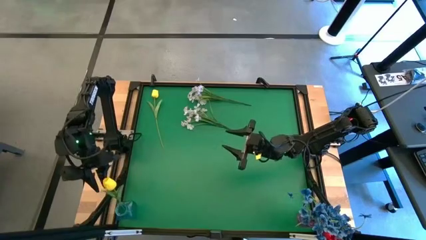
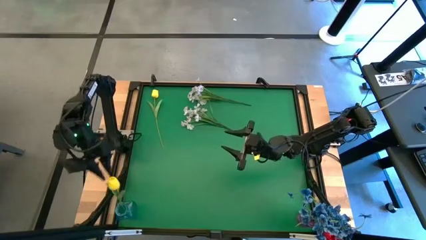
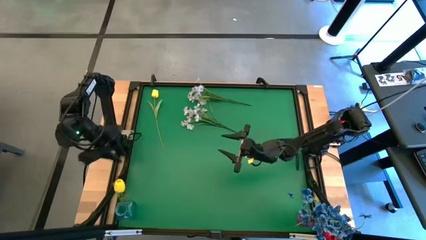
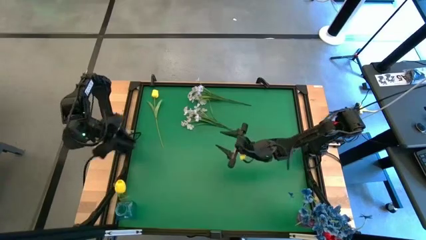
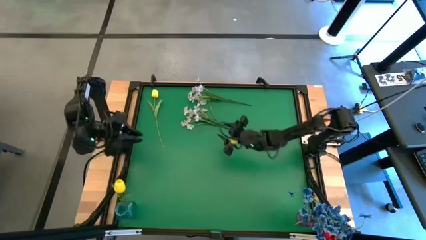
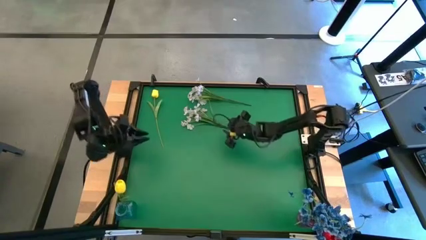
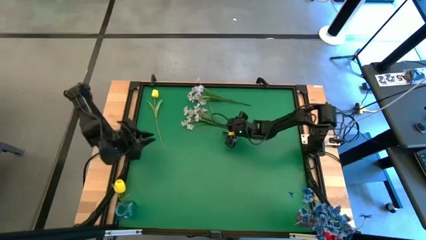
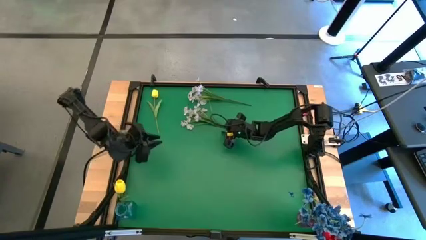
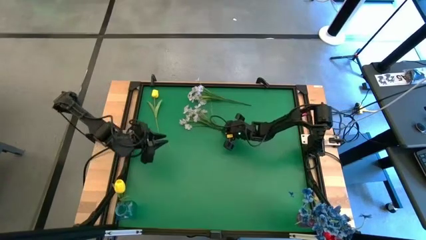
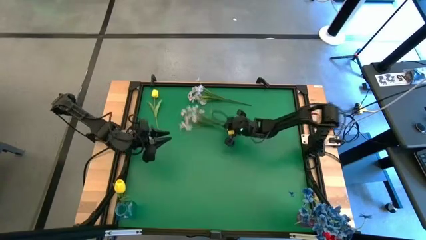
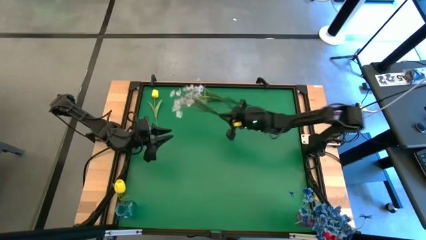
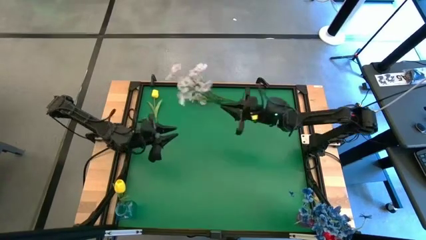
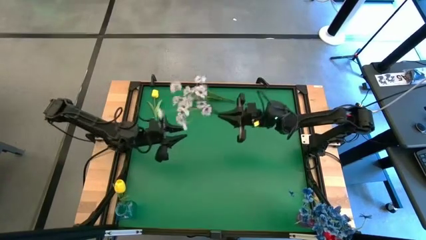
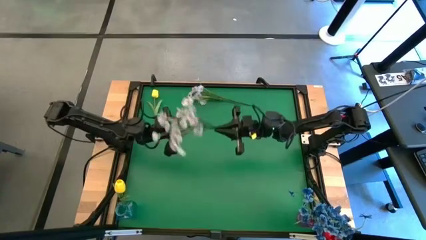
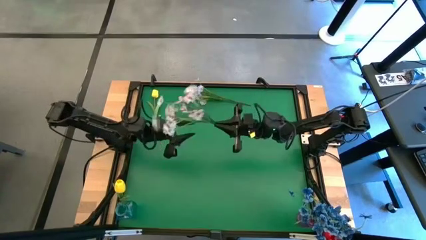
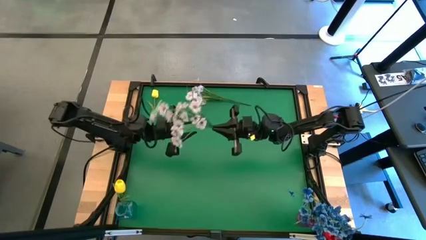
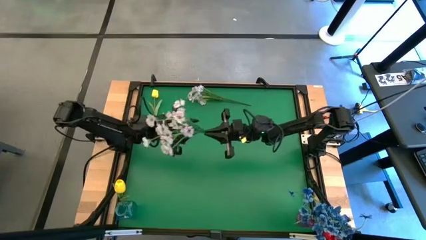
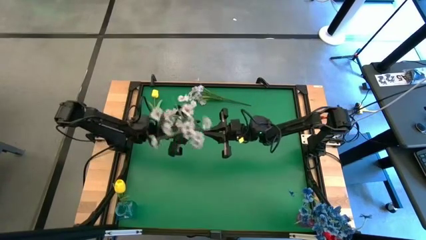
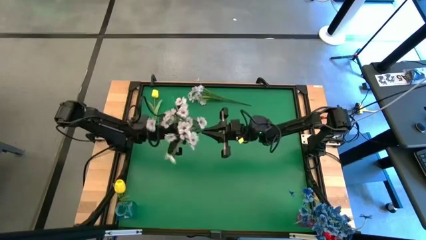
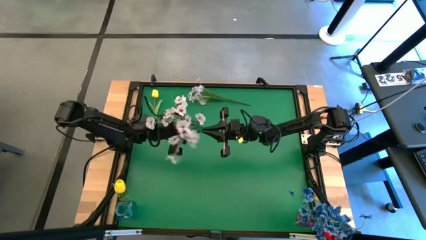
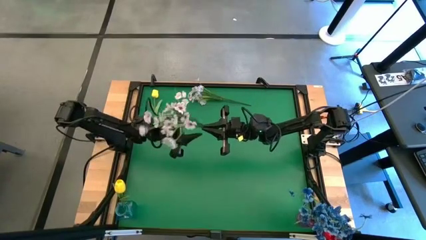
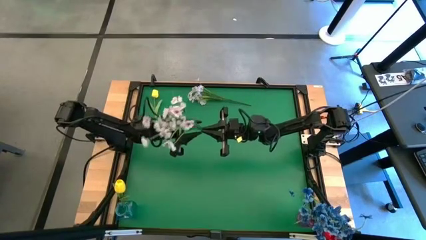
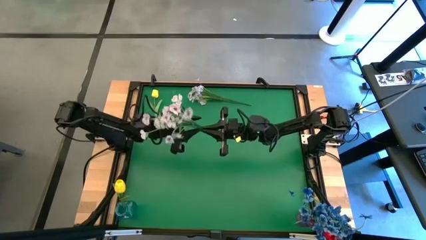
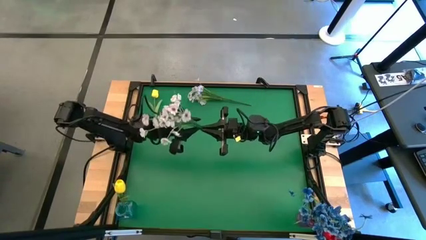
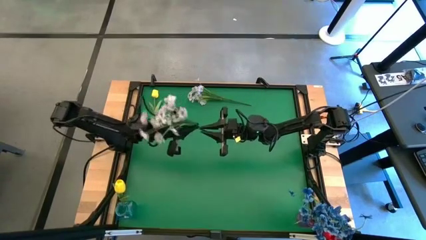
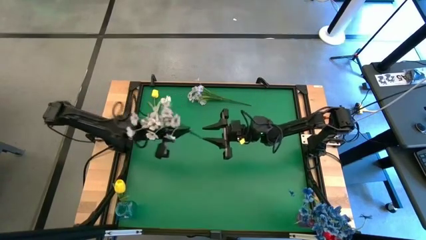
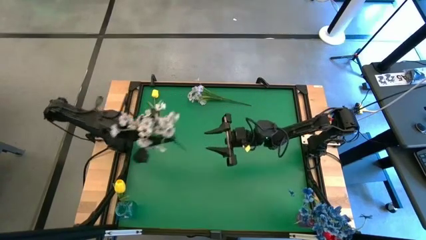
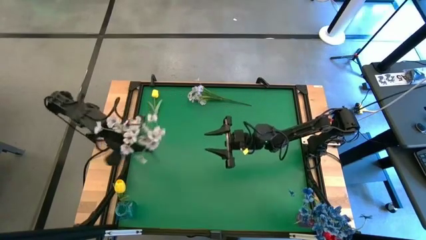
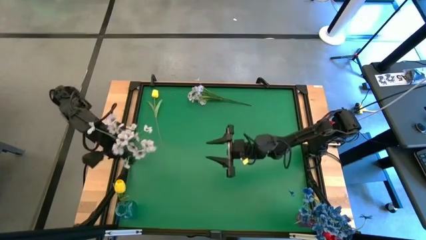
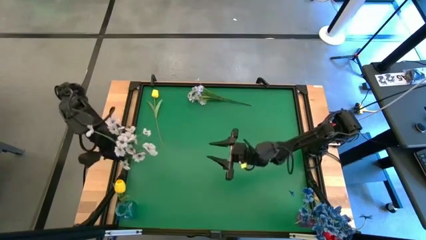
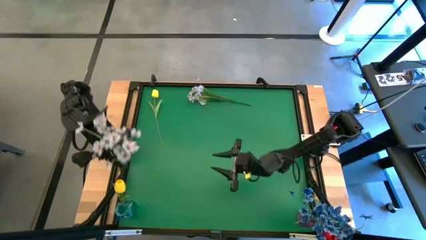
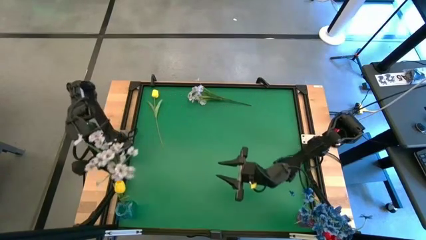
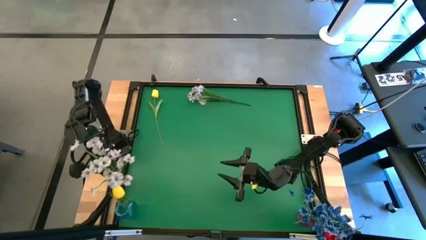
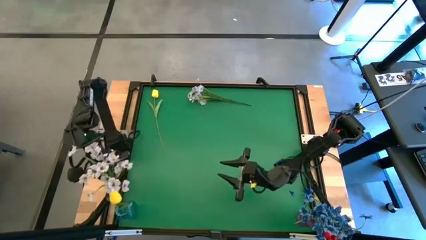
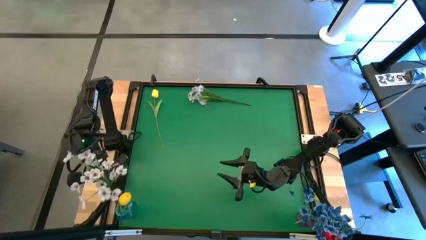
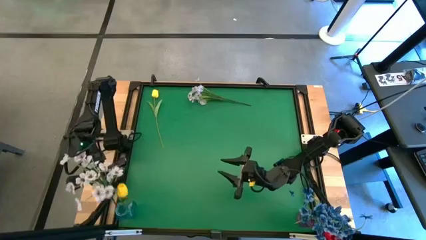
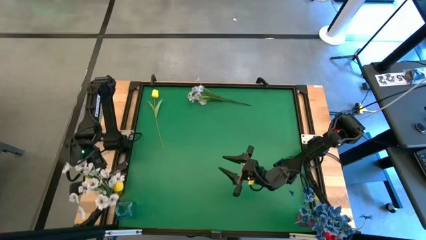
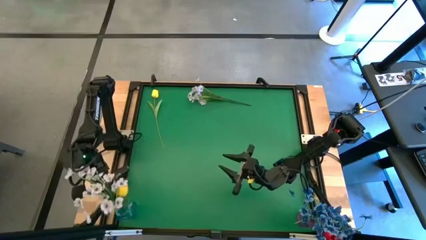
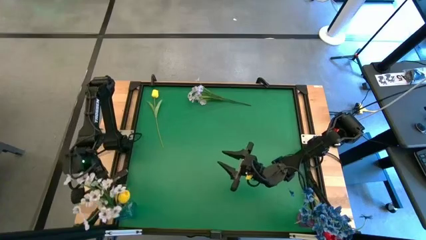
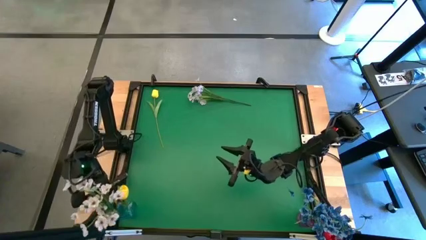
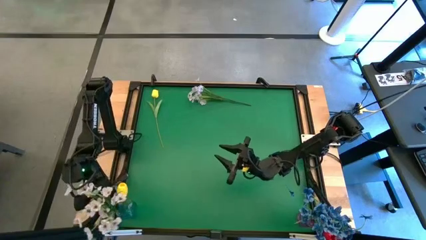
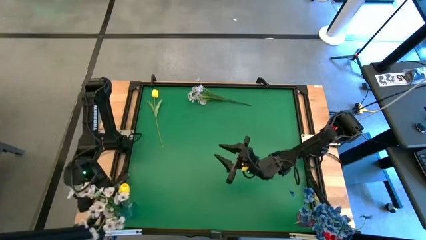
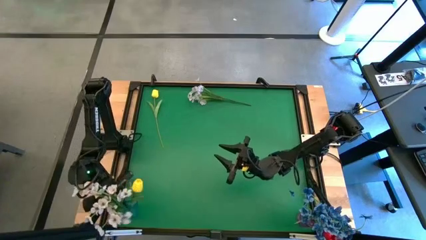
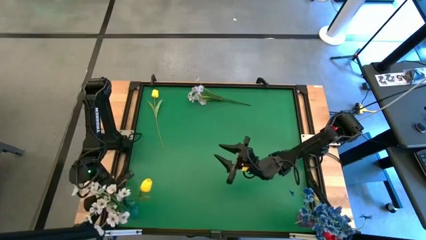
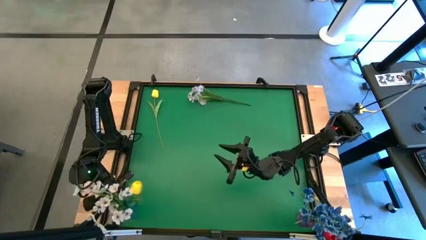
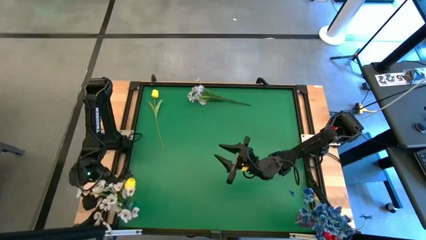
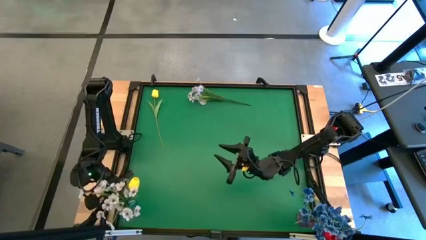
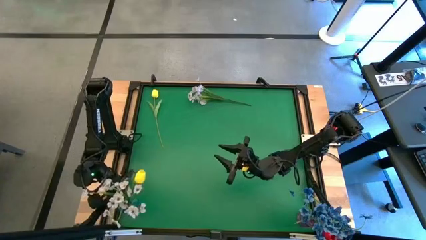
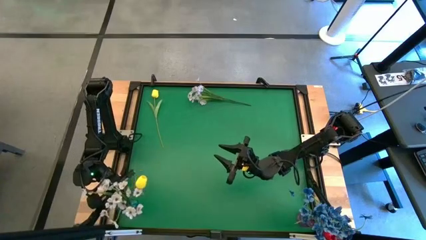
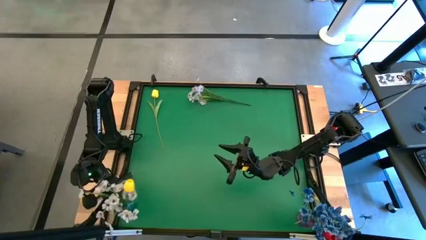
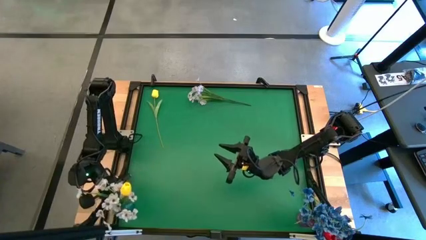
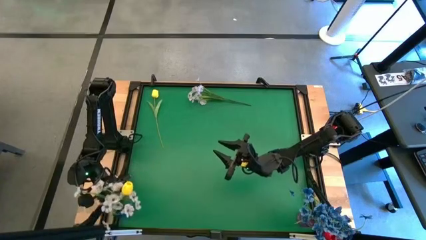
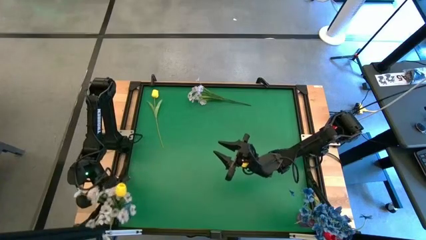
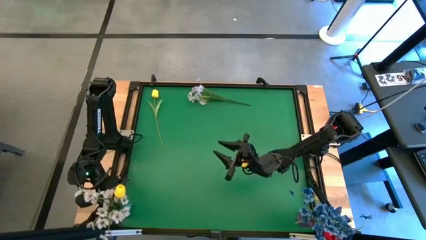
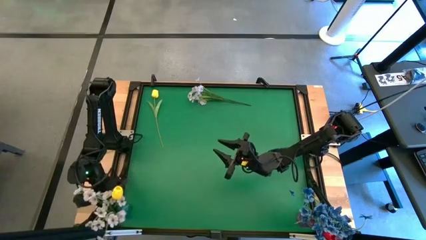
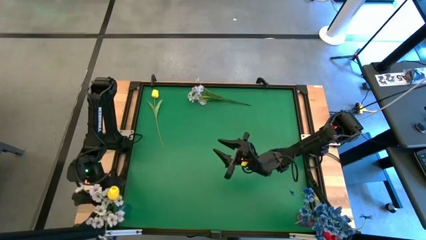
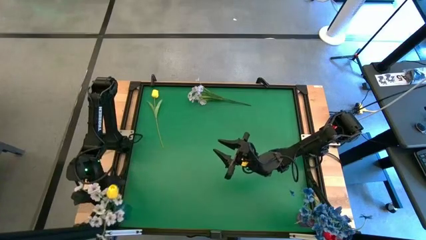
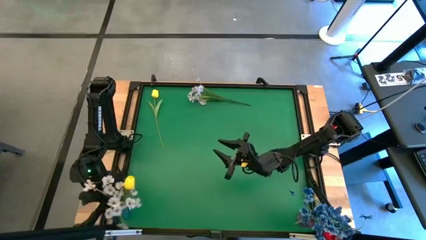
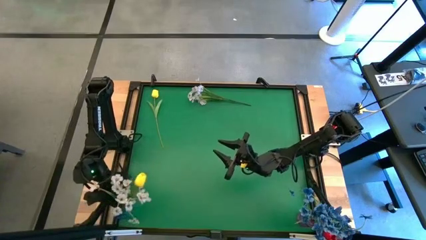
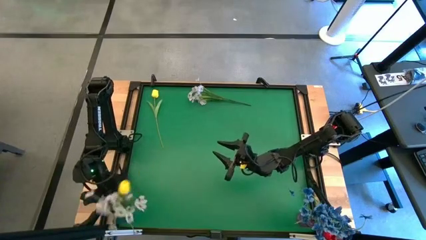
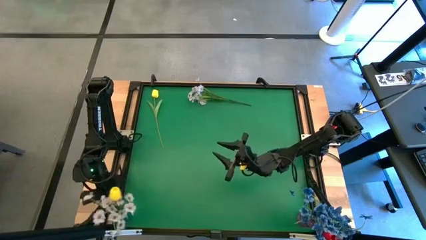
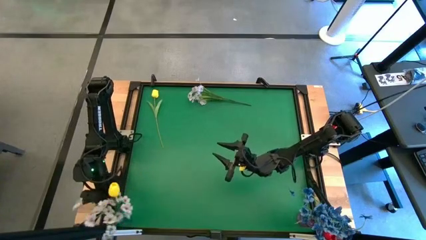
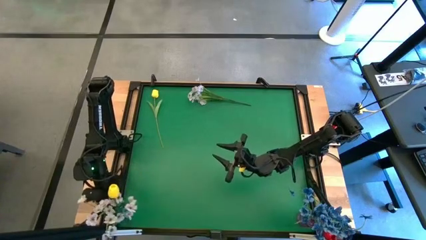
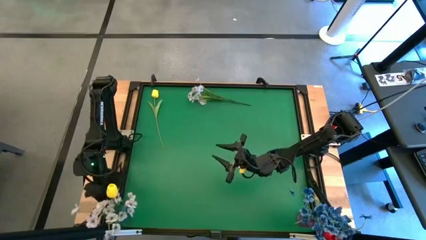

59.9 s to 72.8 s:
Task: Sort flowers into vase by color
Put the bottom white flowers into the blue vase

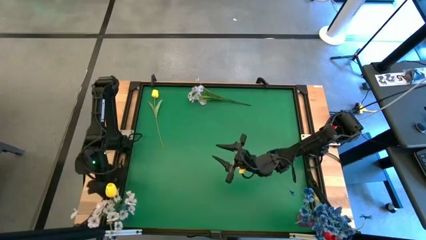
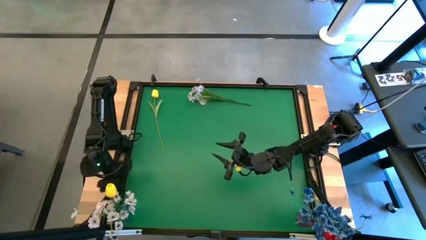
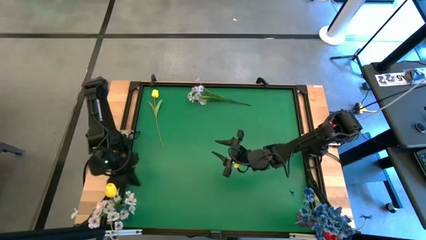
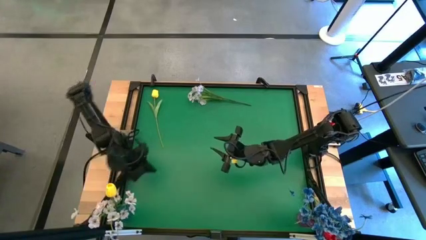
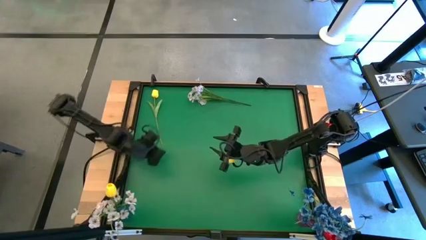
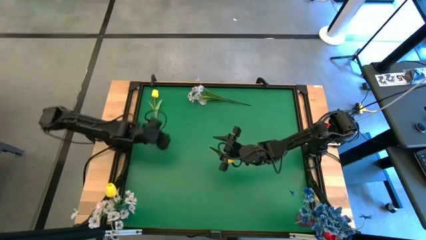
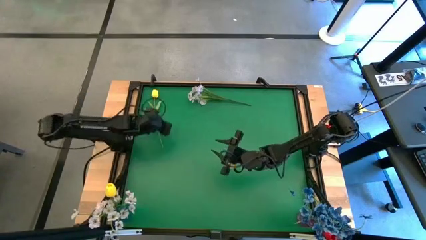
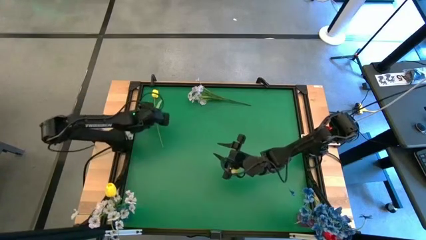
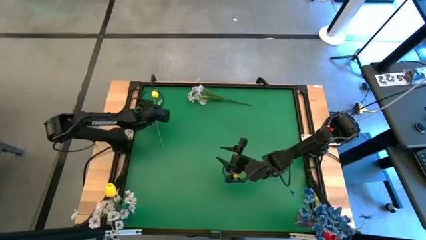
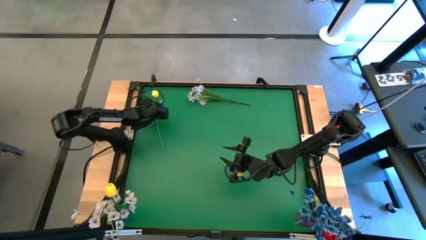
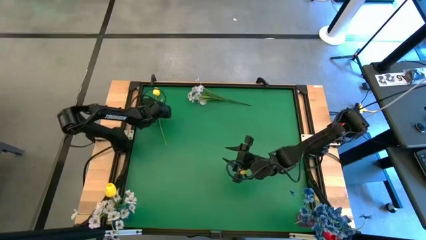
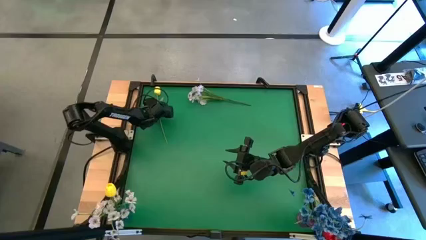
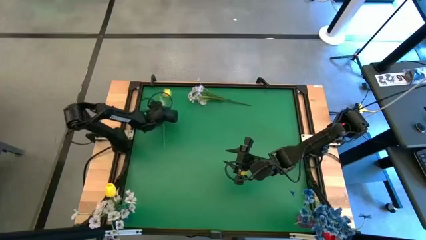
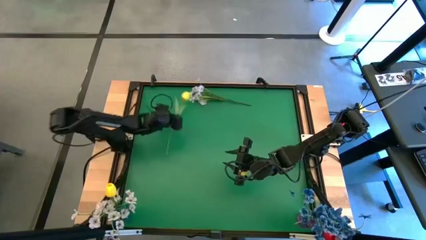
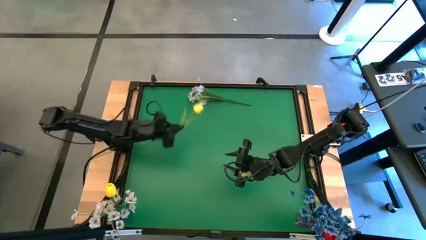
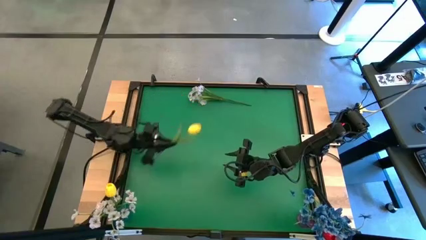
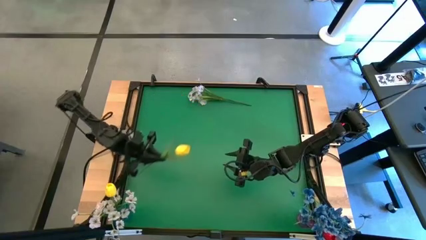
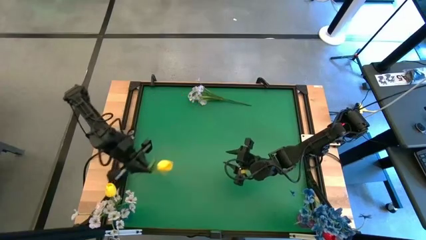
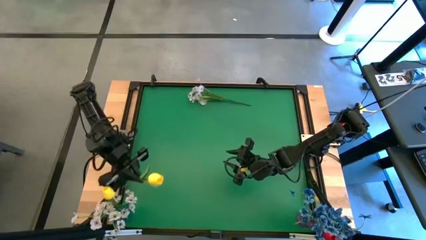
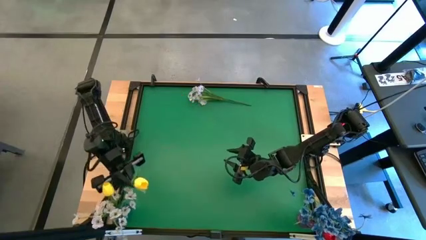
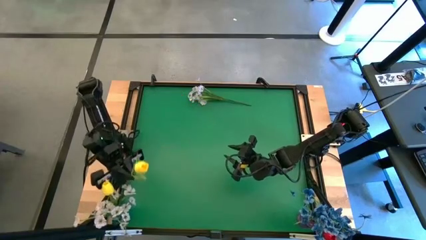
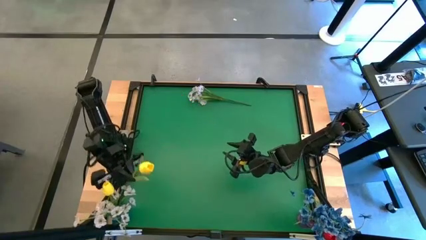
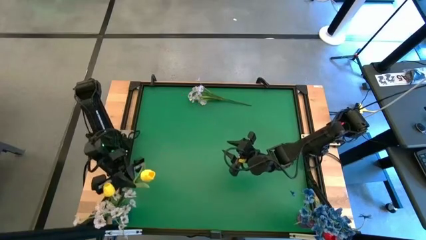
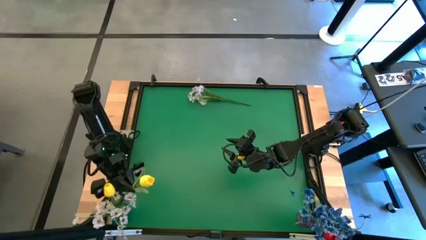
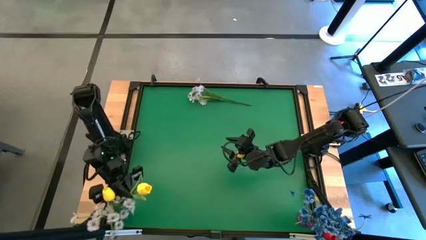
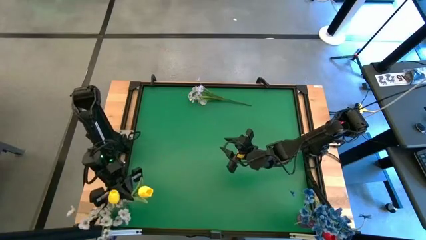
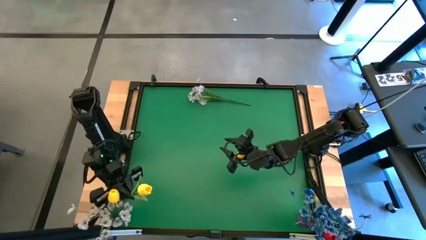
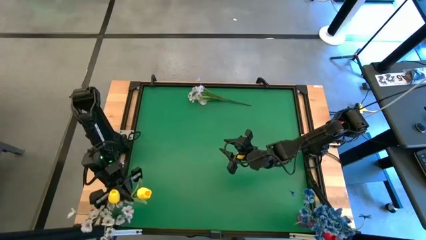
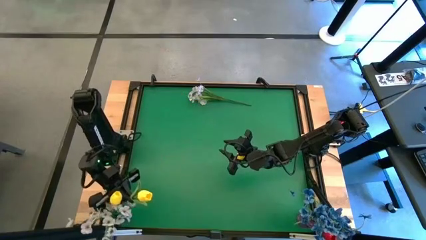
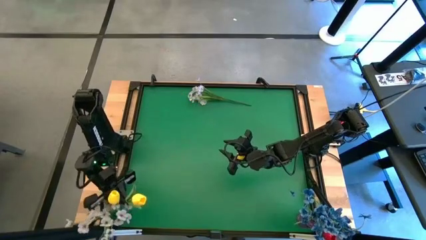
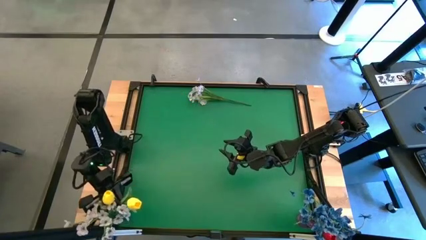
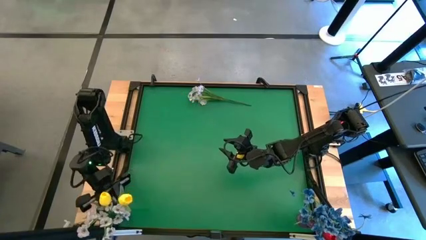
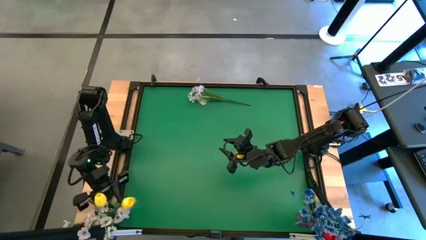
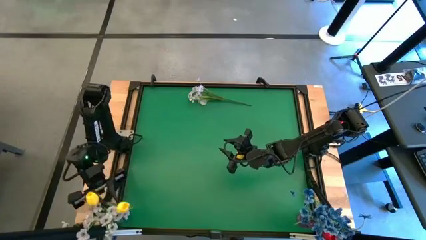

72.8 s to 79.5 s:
Put the yellow flower into the blue vase
